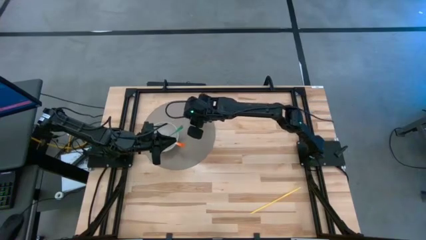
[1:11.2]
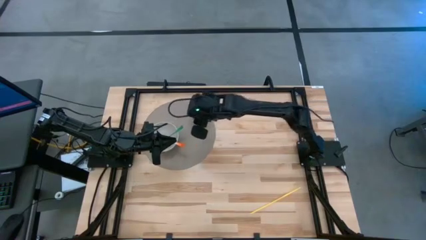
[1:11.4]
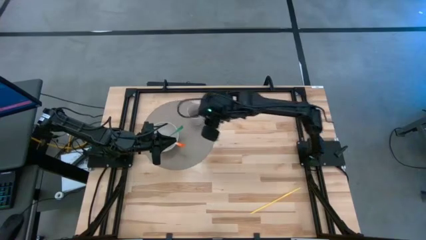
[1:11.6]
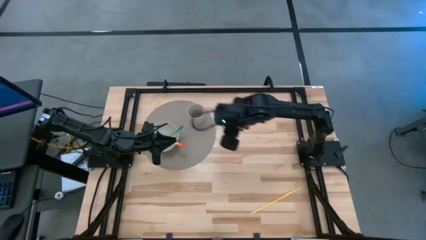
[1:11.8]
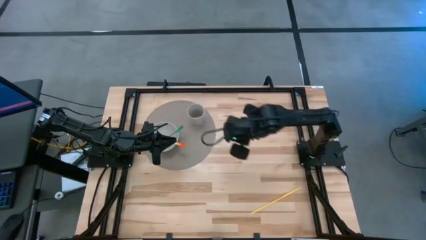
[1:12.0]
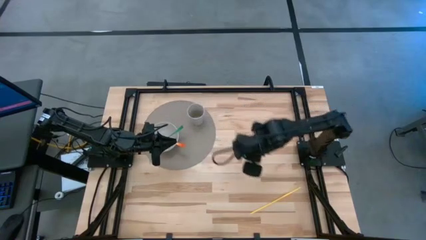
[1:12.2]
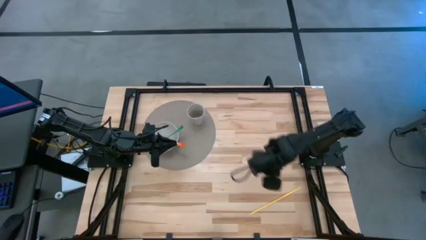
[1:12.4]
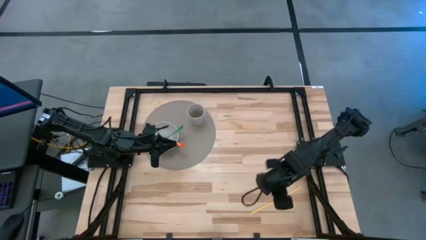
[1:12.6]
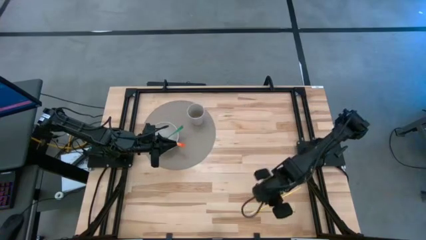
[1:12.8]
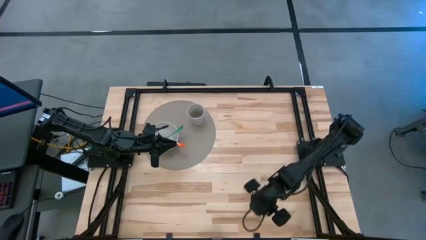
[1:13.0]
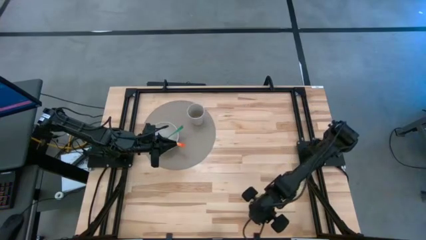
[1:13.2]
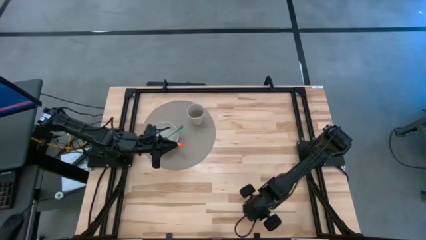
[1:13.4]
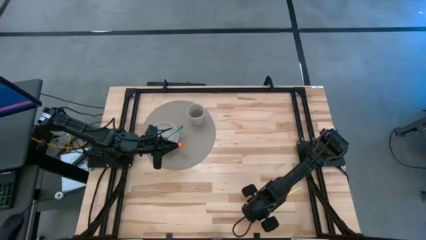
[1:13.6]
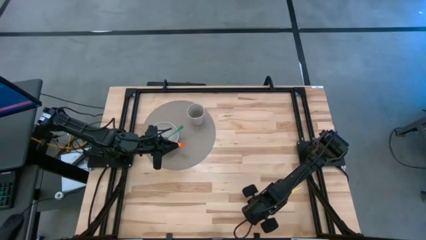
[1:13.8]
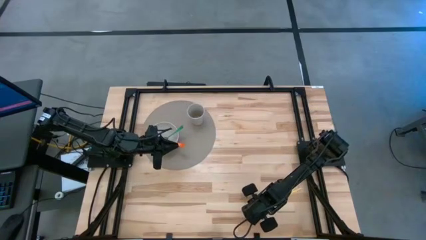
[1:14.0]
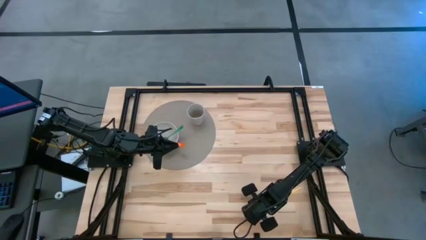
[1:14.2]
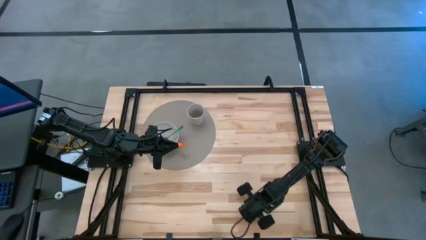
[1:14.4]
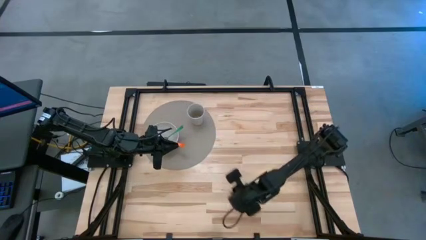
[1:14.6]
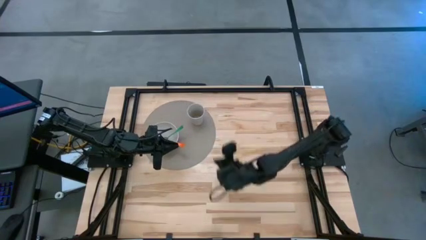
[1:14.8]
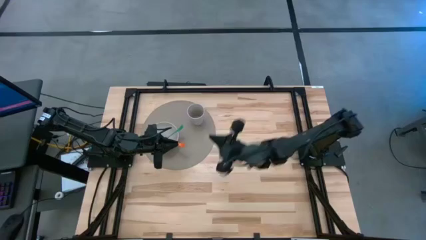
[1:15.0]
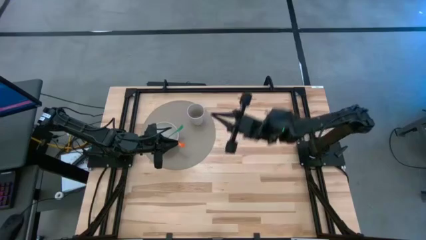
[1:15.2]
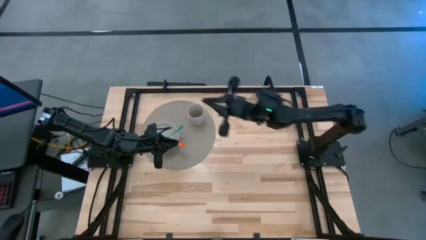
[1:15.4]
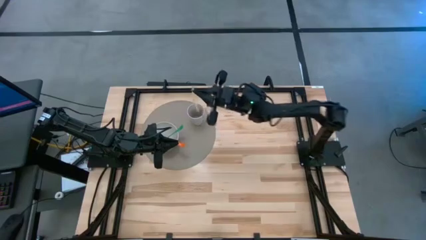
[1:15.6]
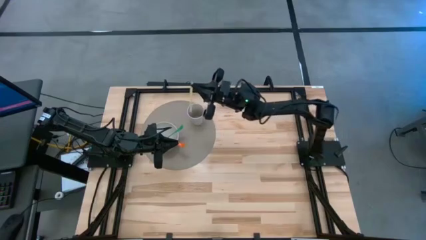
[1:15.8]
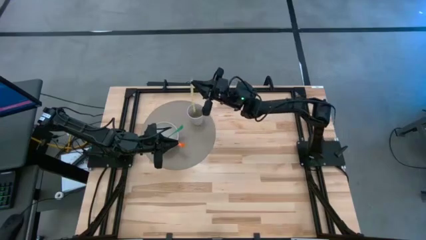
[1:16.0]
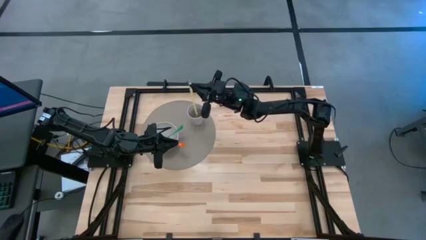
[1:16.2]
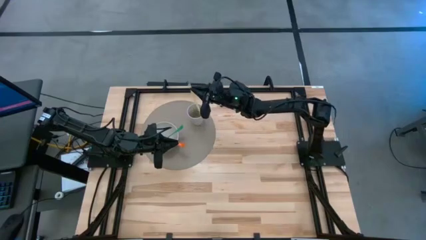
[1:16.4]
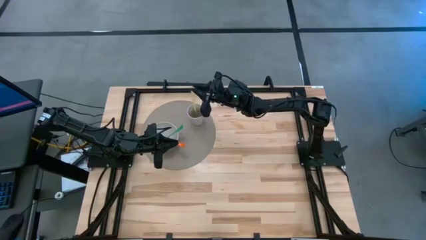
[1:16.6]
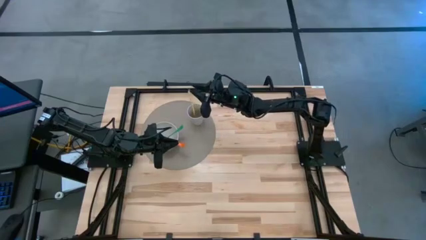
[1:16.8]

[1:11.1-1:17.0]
Task: Pick & Place Utensil
Put the yellow straw into the white cup

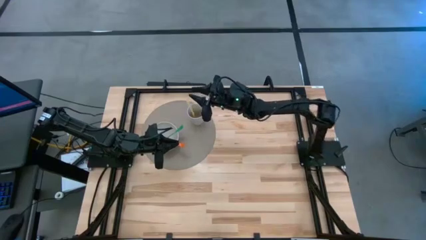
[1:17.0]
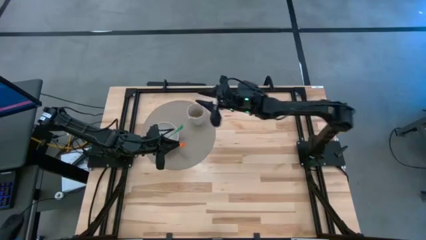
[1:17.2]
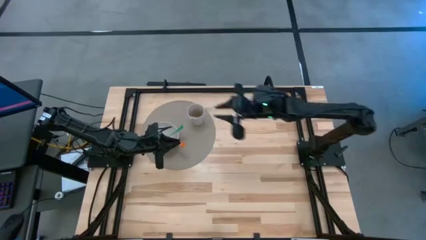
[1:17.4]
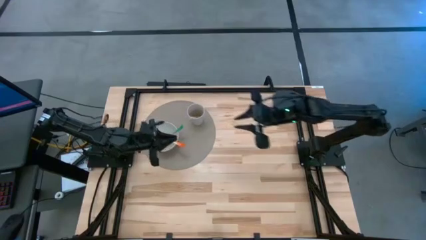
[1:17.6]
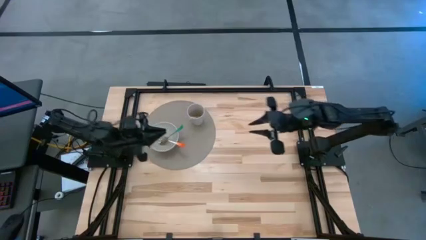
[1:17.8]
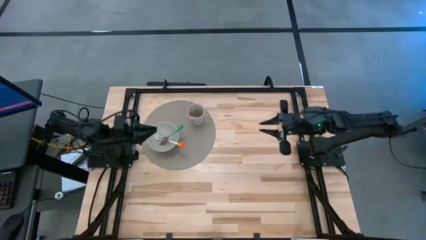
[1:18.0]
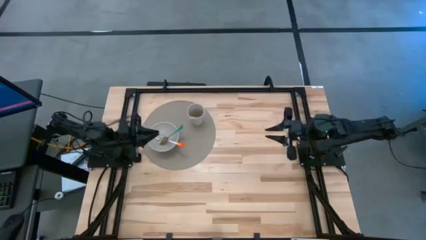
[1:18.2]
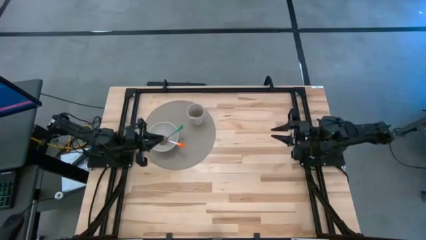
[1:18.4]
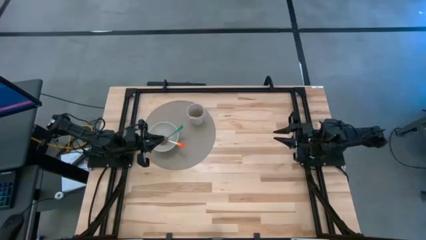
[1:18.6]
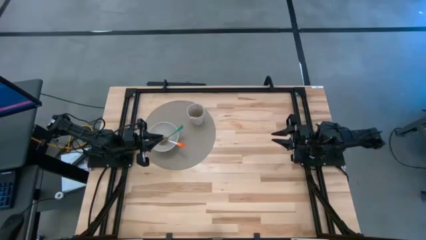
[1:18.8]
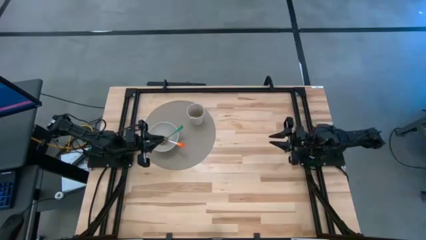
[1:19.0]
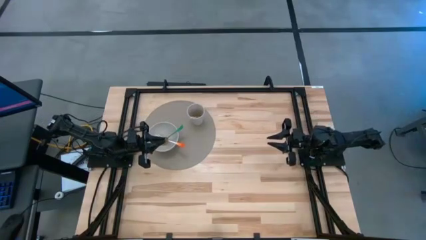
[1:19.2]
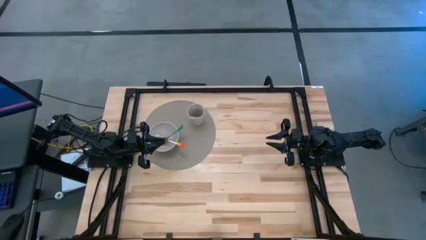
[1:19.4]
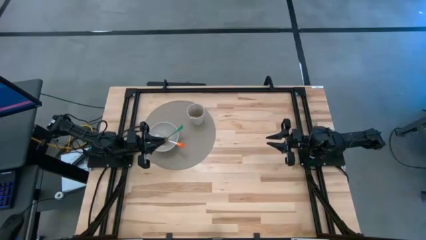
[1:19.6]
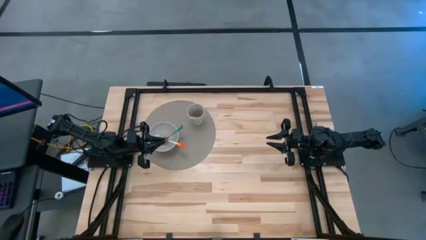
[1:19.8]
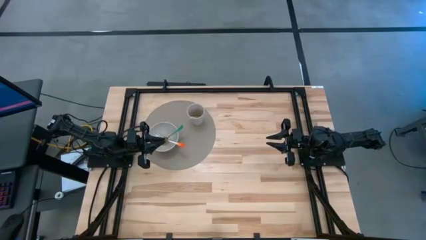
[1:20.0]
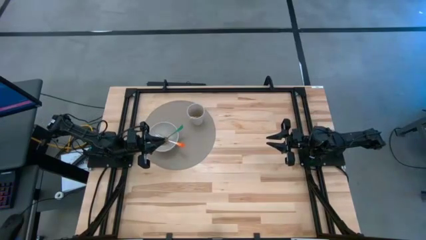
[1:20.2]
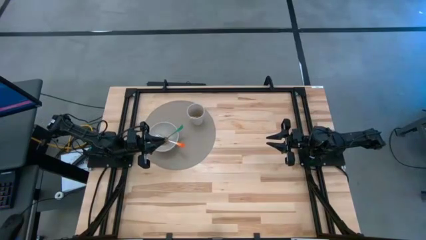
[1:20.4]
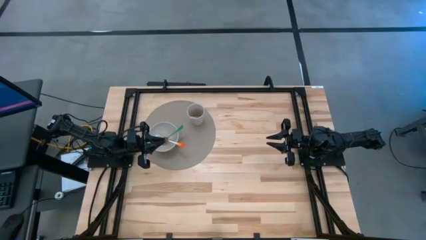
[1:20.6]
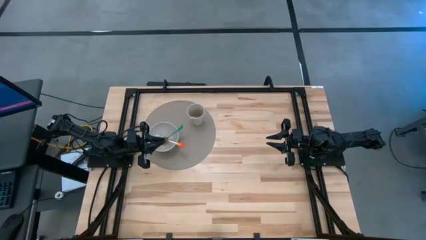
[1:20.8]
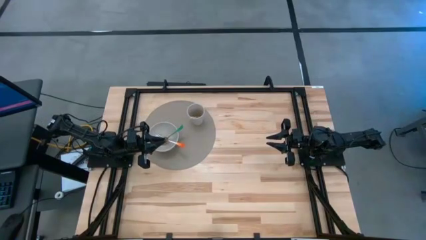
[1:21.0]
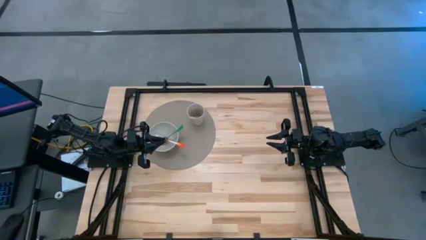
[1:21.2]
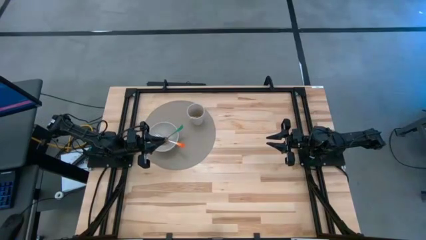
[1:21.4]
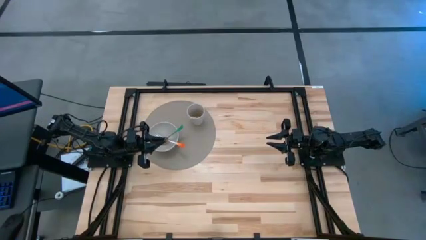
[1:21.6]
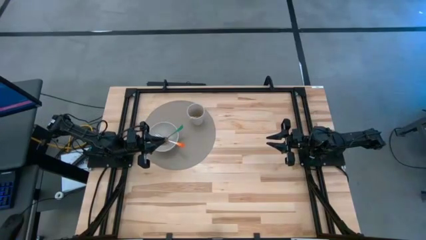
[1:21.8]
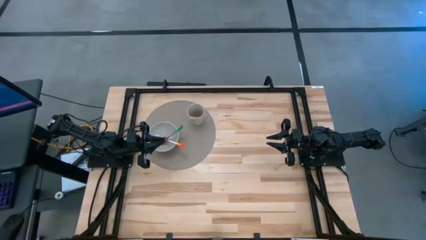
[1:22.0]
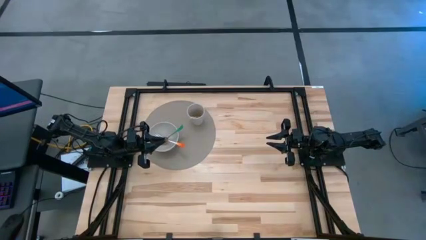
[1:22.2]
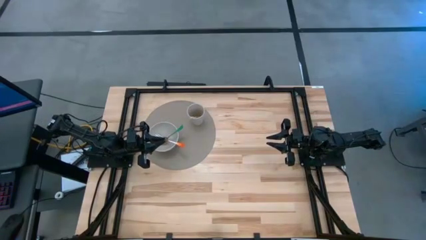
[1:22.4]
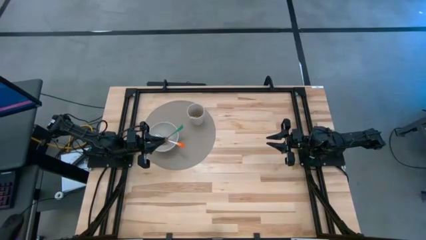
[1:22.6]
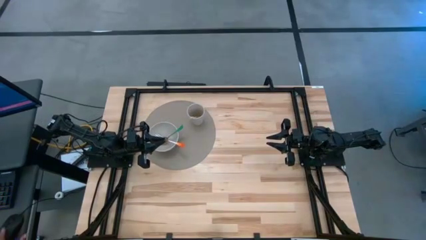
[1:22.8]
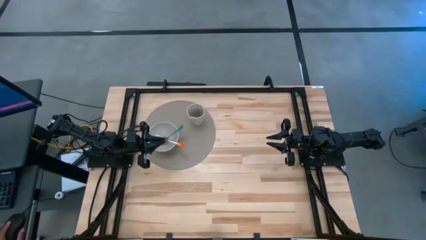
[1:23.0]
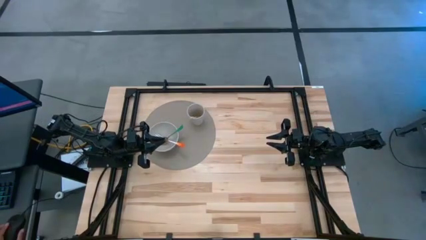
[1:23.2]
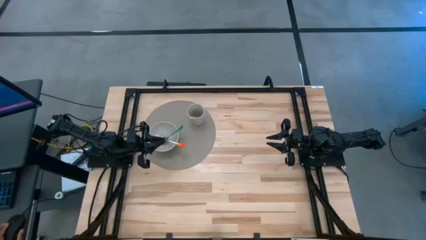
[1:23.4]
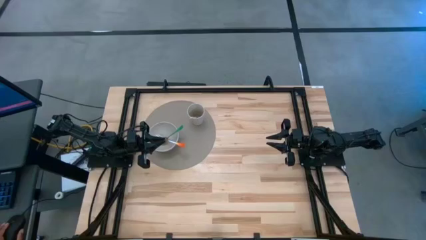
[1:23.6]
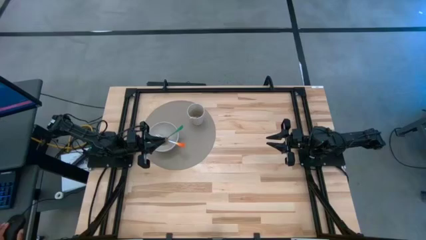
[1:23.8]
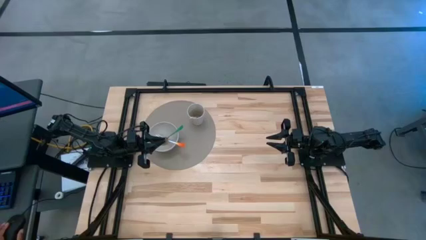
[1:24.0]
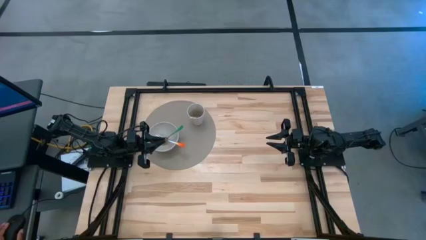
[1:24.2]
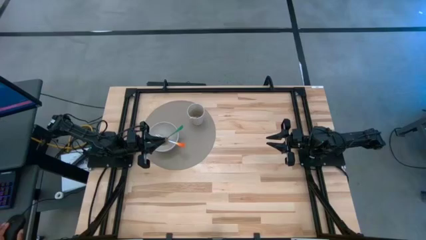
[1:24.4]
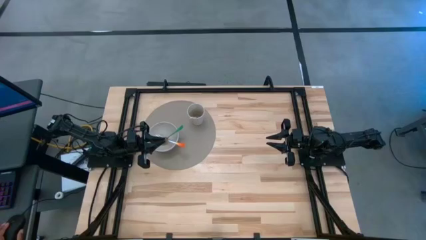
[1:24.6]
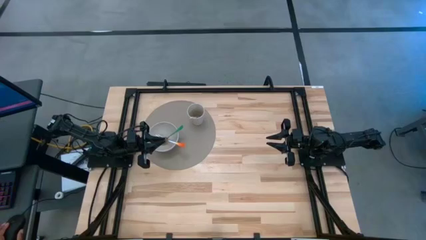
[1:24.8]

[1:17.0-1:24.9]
Return to Home Position

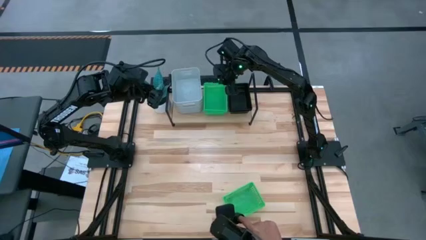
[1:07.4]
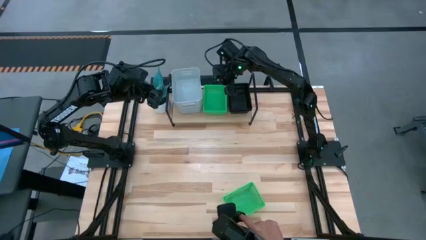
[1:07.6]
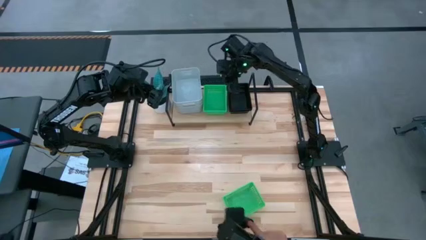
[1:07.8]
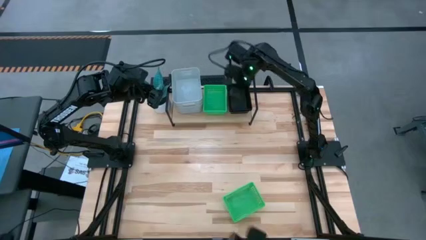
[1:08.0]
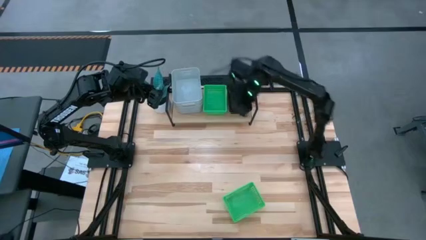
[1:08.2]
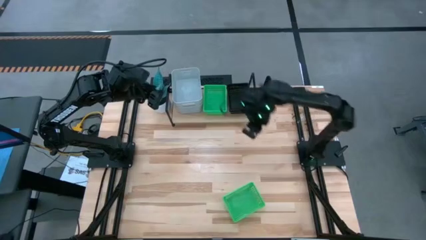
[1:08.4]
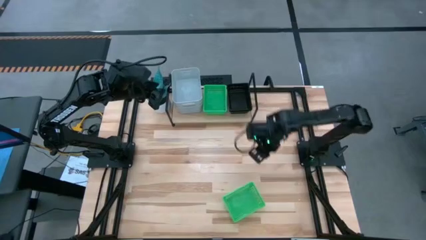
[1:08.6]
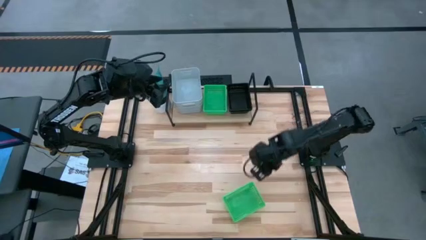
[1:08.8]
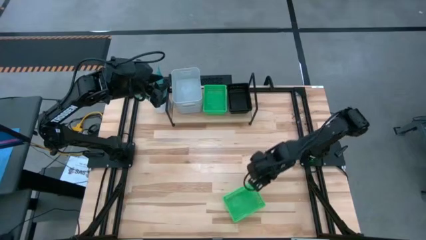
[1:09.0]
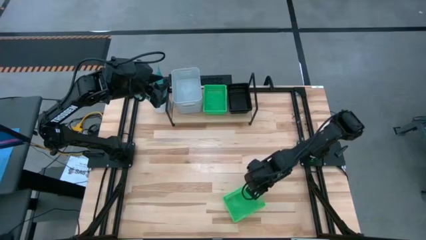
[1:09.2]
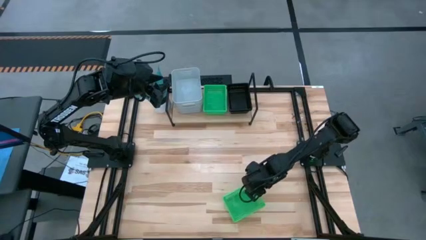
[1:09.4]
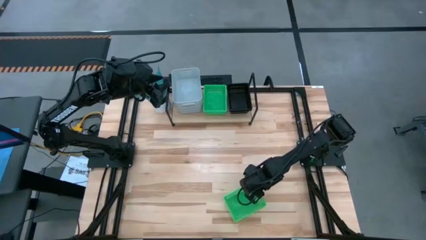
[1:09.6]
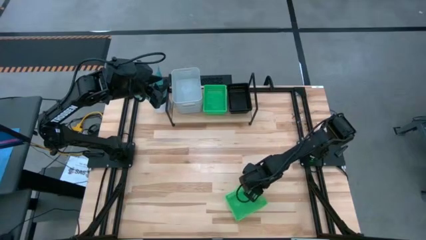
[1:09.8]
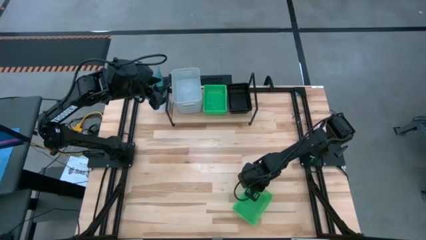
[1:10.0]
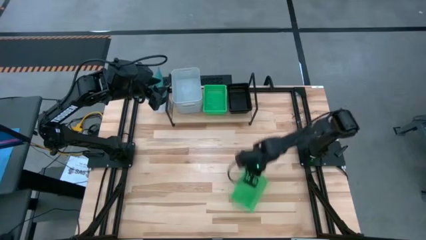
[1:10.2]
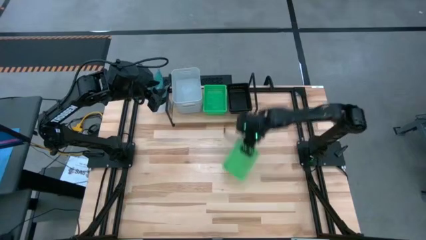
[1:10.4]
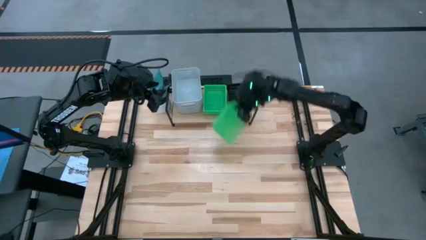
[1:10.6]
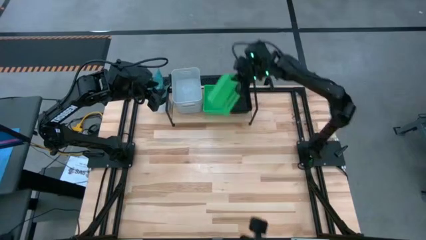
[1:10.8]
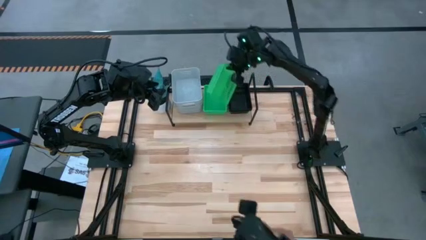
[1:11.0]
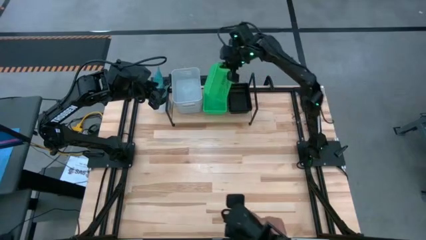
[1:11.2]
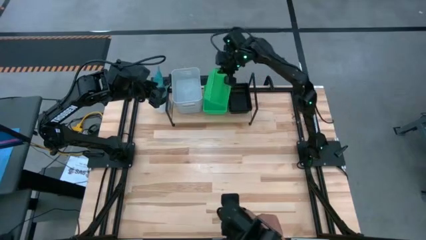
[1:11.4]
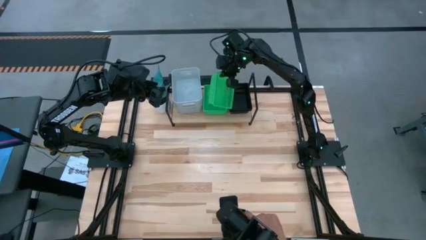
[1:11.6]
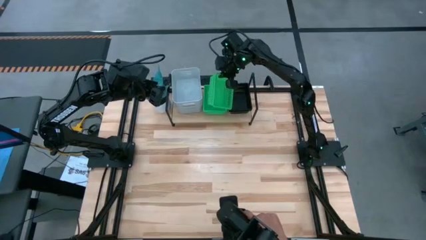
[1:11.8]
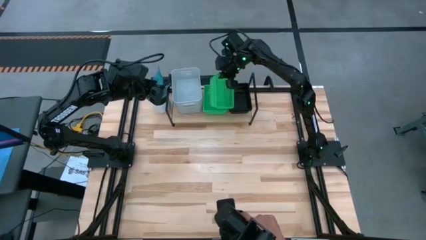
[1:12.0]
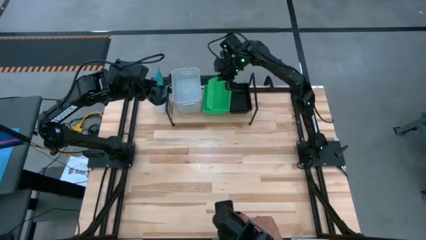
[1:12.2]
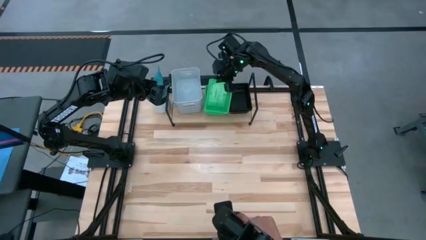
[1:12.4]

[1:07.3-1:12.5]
Task: Stack baskets on shelf by color
Stack the green bin on the green bin on the shelf
